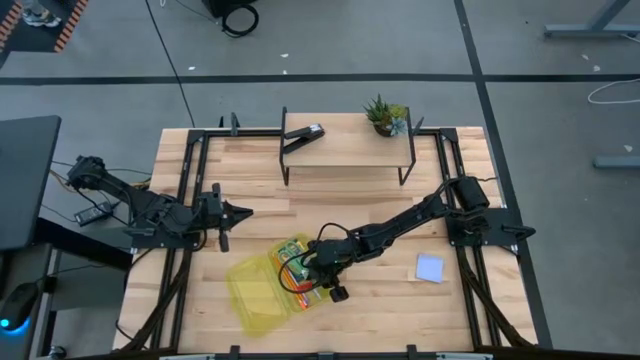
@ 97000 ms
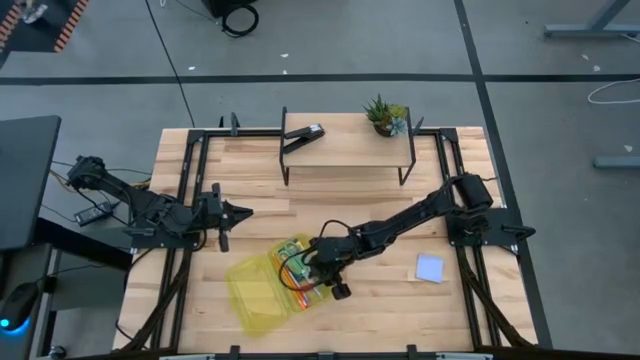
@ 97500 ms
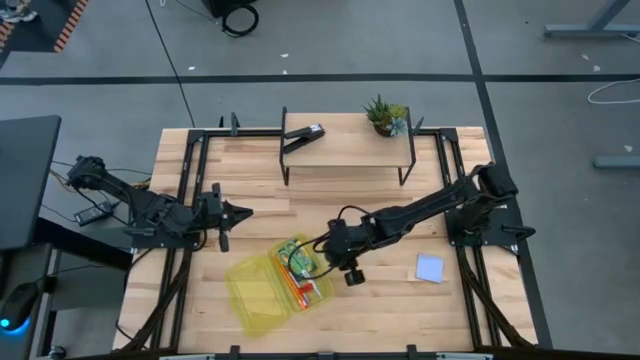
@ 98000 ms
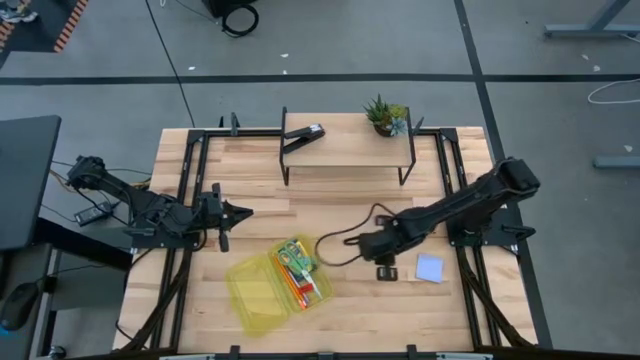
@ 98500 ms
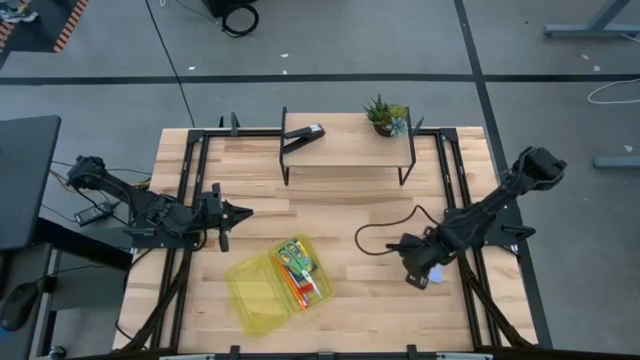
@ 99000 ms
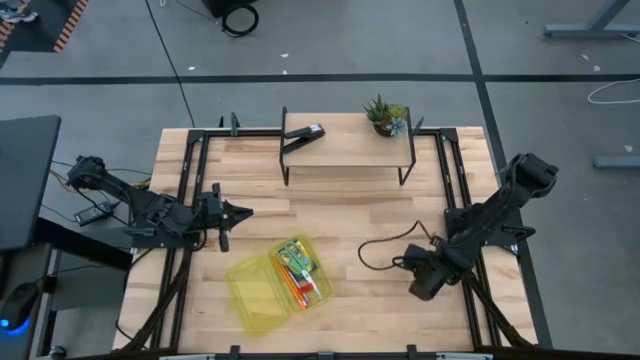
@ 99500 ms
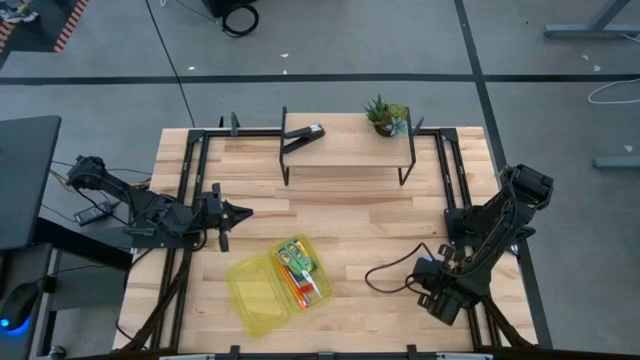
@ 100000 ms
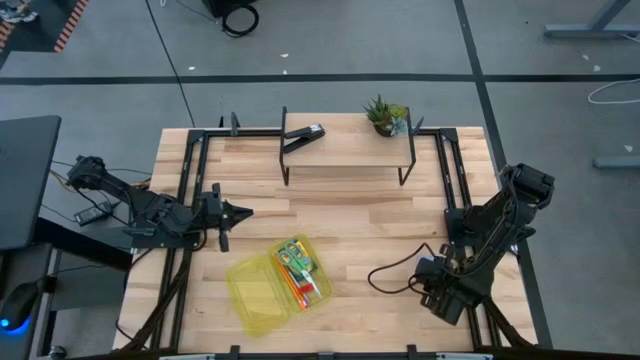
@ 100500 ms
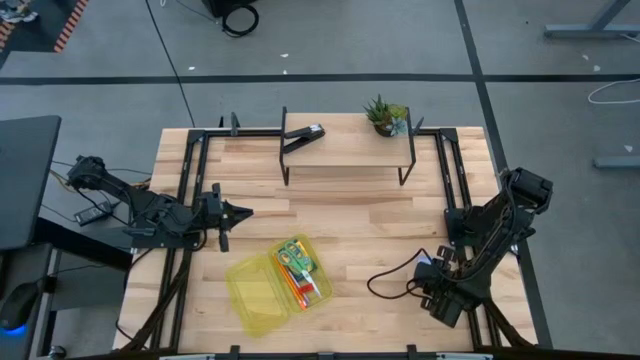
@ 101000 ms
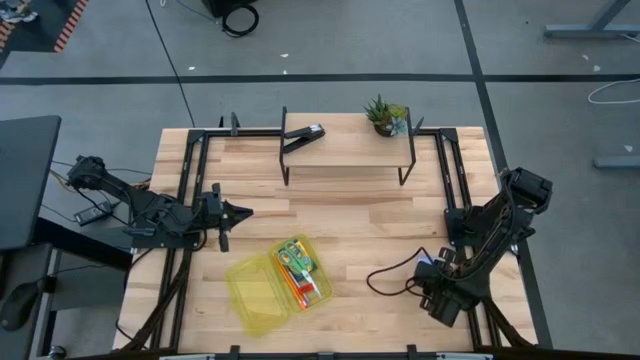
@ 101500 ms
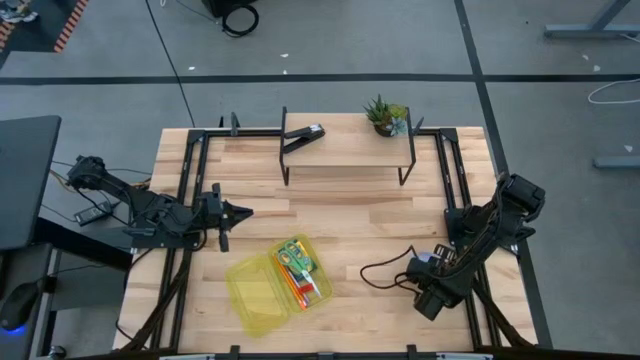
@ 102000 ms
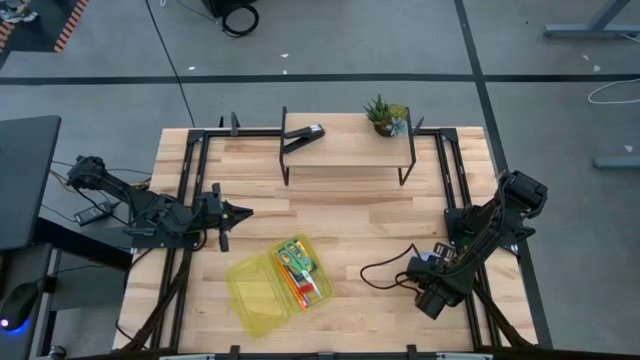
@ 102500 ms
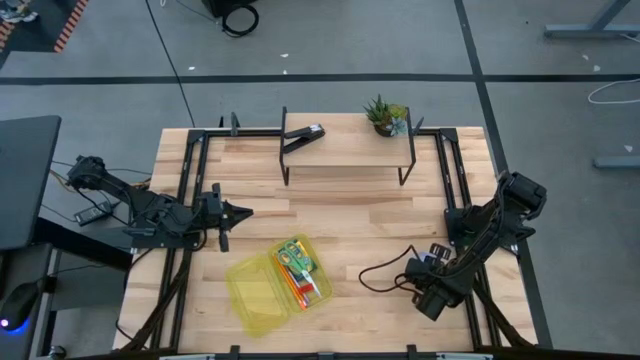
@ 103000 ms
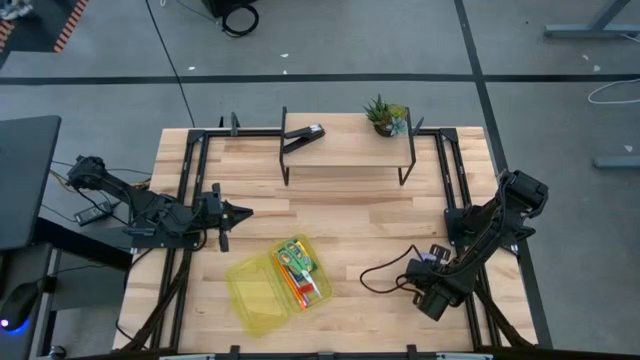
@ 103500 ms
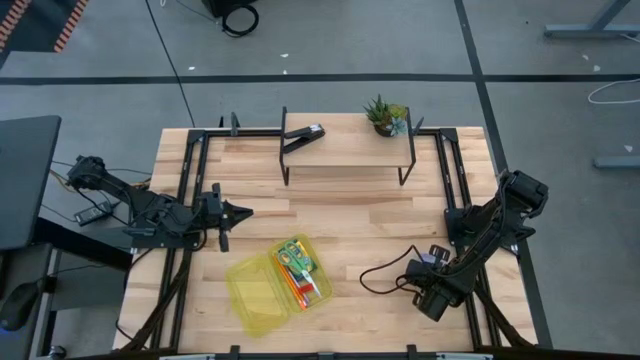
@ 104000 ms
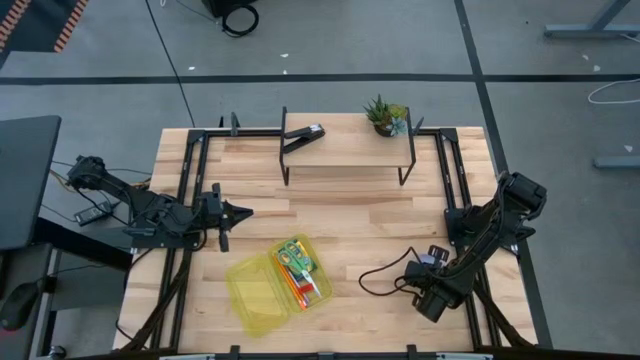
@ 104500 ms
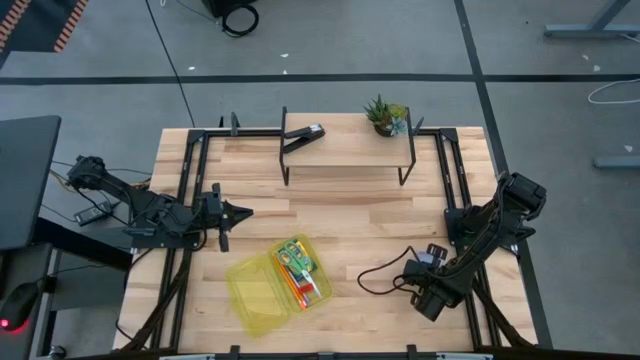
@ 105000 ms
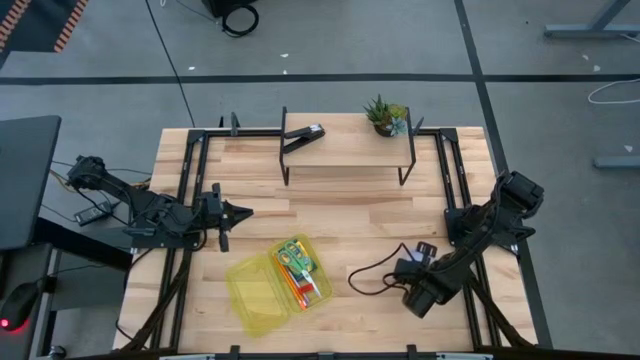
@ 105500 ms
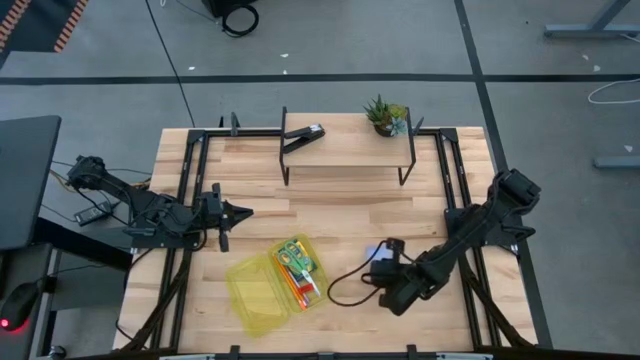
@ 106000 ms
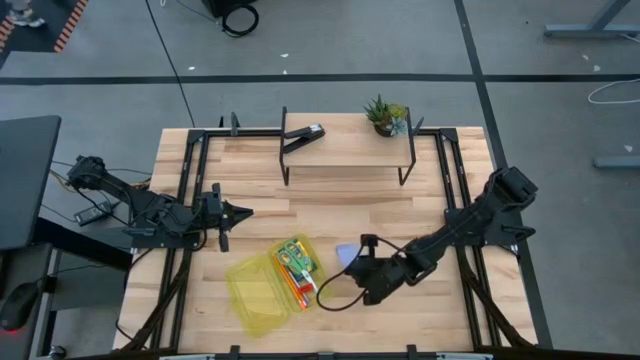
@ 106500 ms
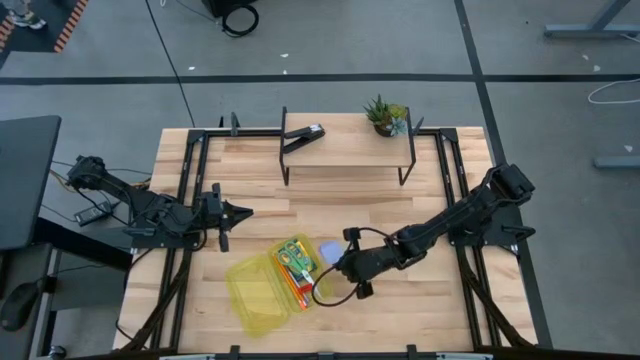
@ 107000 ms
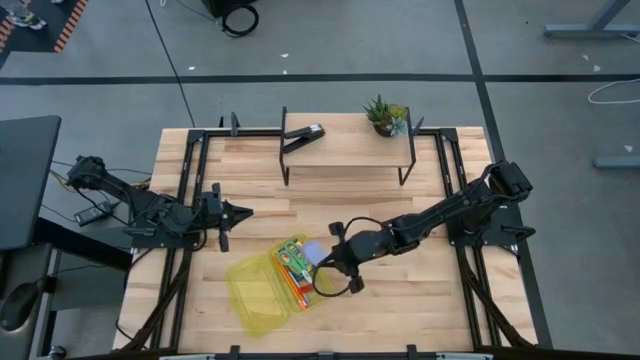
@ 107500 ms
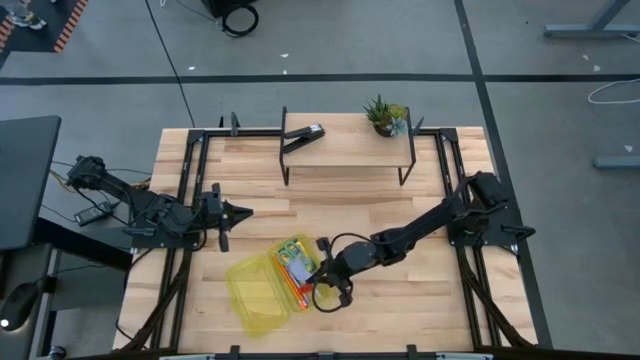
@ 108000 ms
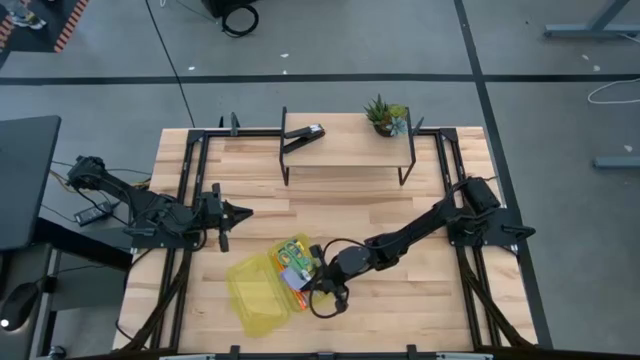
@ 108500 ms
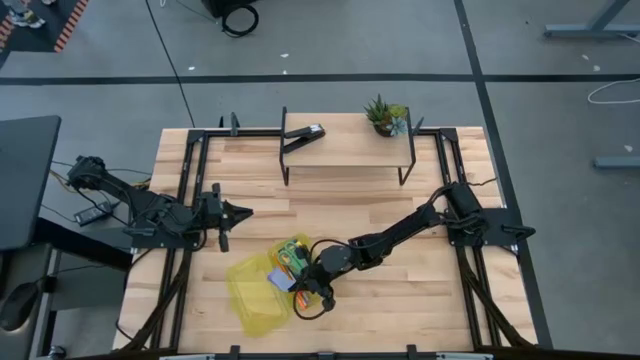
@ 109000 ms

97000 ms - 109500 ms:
Task: Pack school essentials
Put the white sticky note into the supply box
